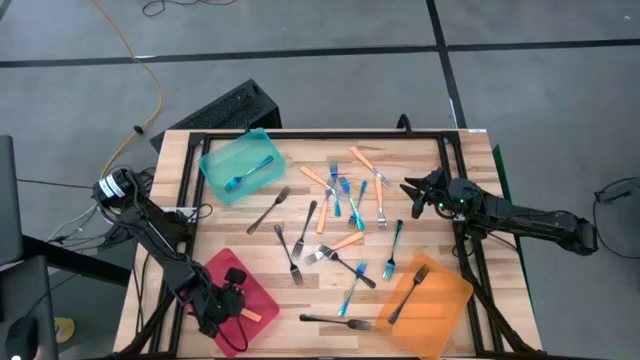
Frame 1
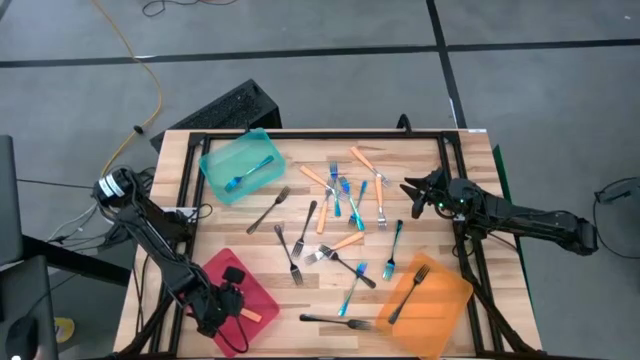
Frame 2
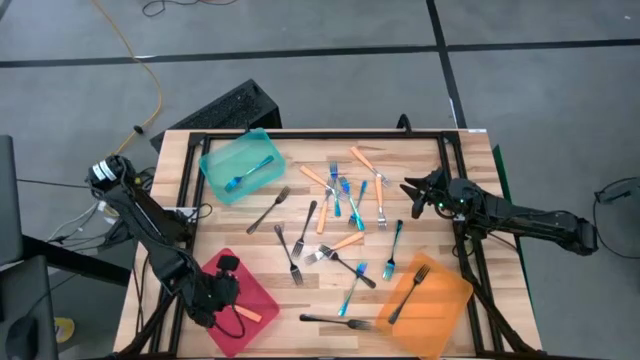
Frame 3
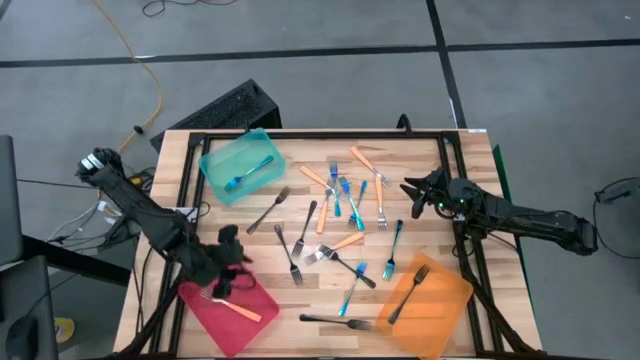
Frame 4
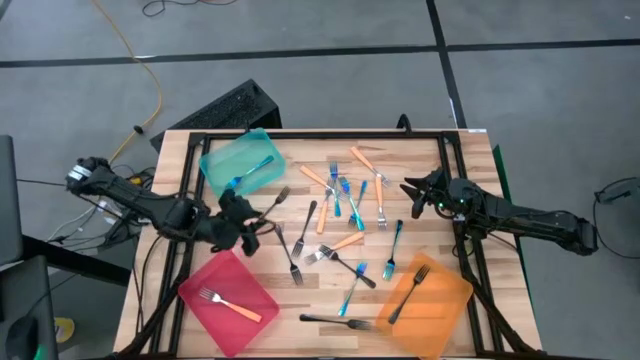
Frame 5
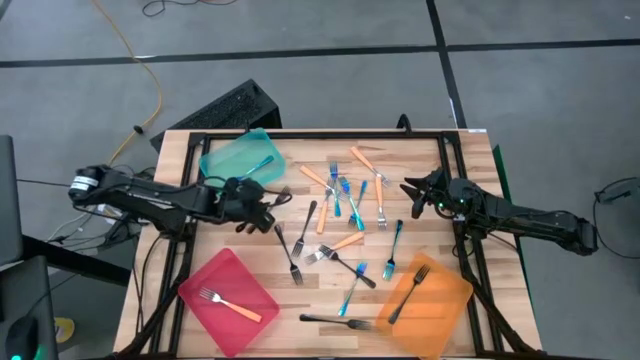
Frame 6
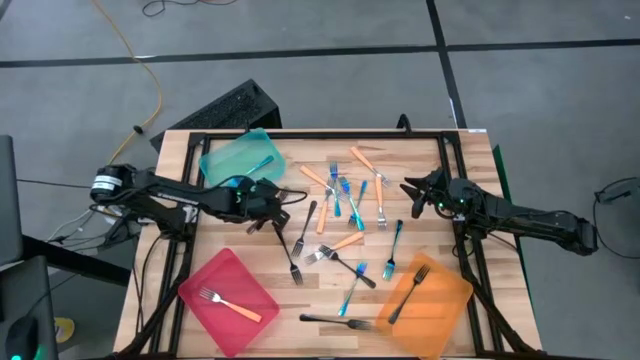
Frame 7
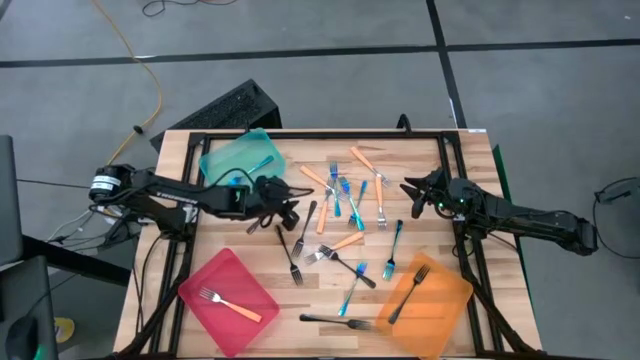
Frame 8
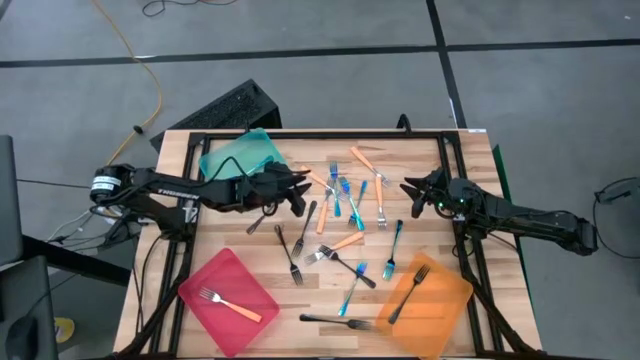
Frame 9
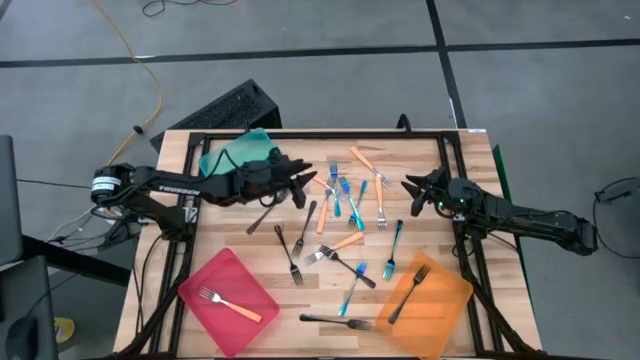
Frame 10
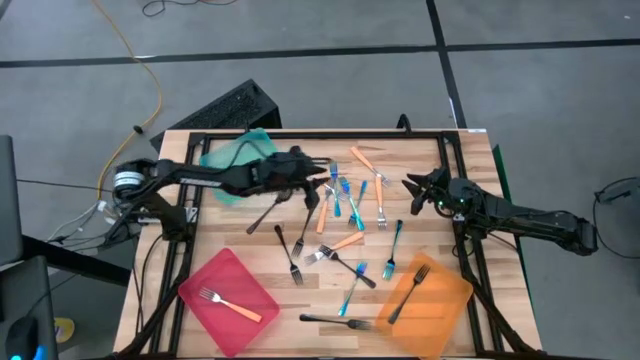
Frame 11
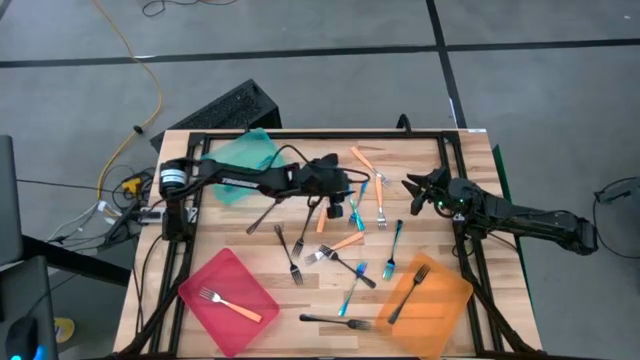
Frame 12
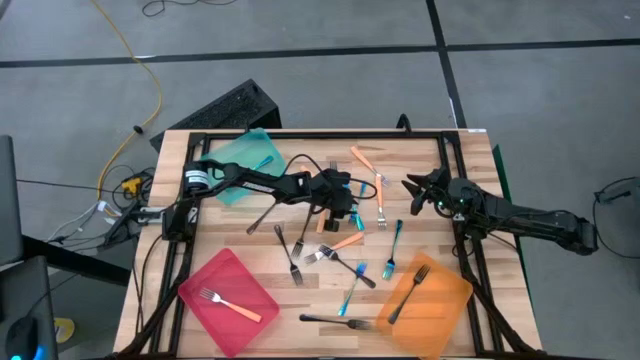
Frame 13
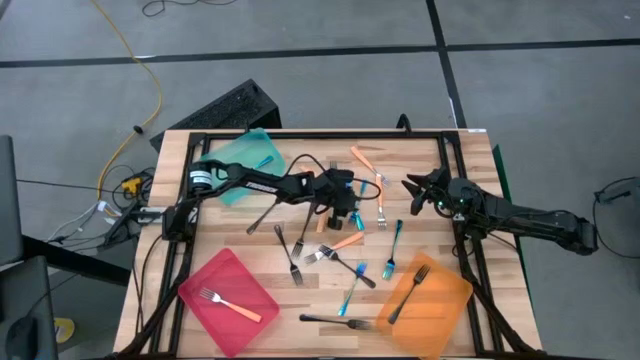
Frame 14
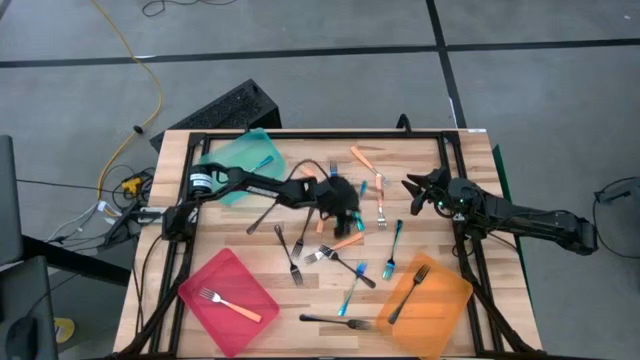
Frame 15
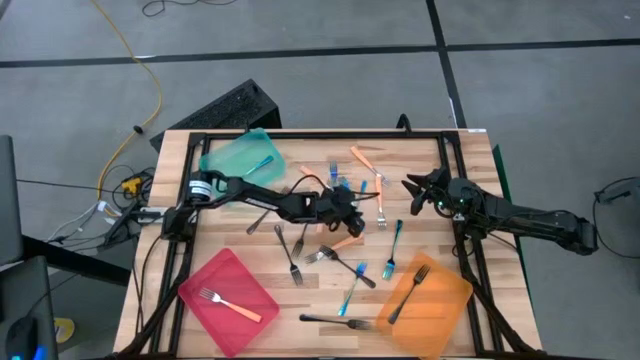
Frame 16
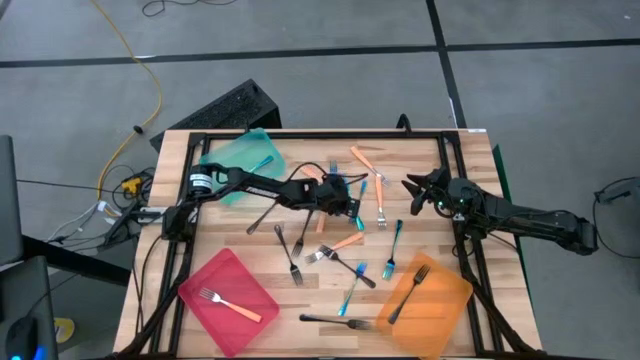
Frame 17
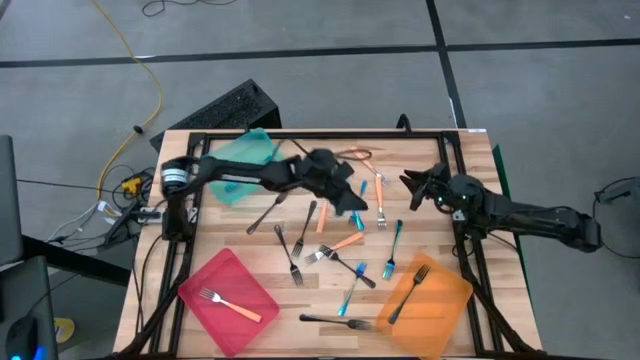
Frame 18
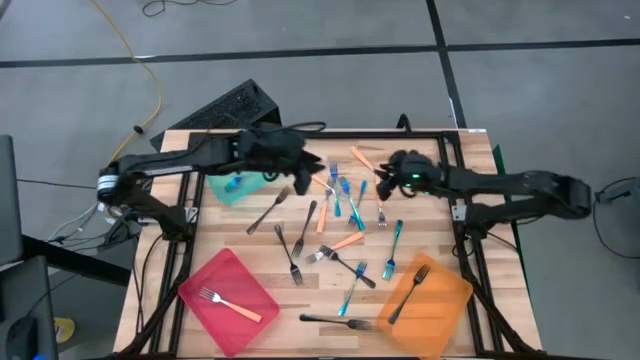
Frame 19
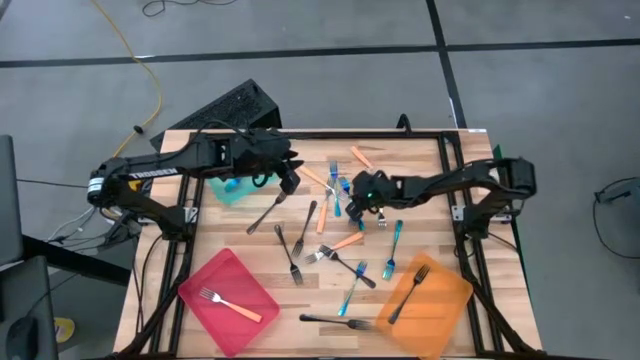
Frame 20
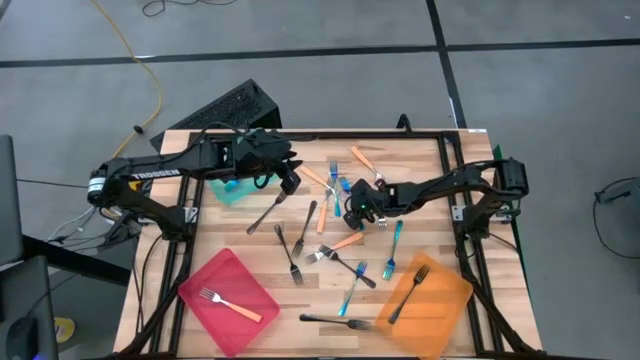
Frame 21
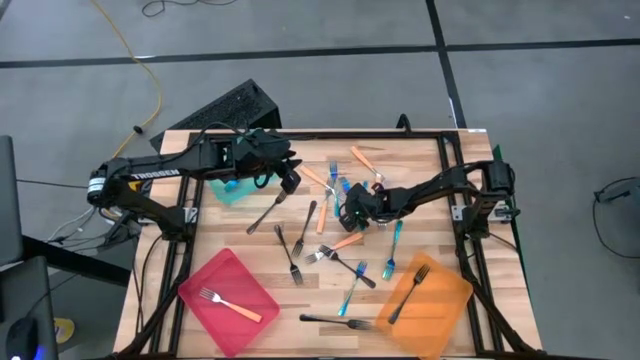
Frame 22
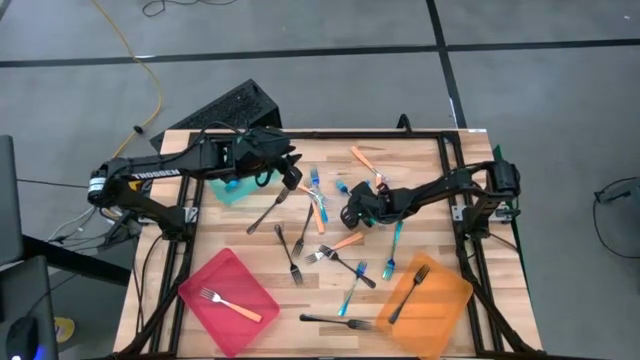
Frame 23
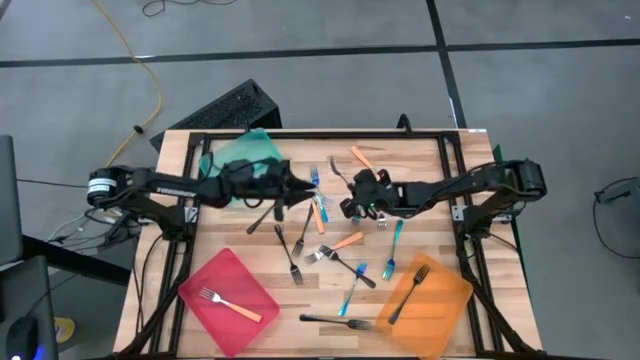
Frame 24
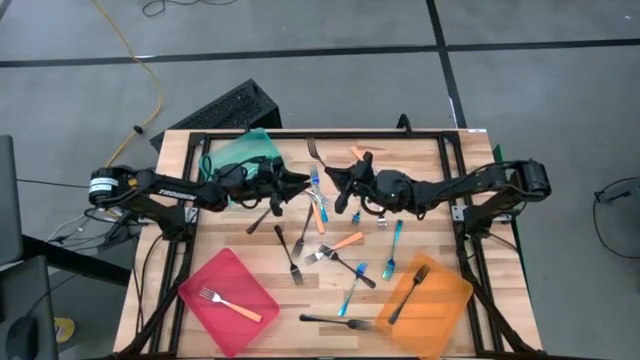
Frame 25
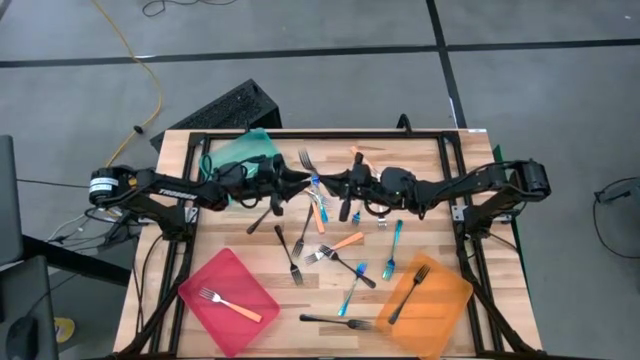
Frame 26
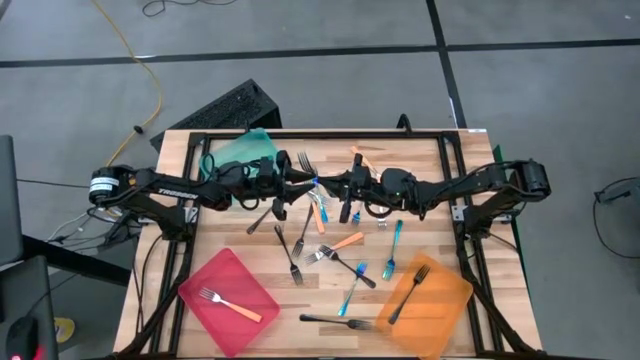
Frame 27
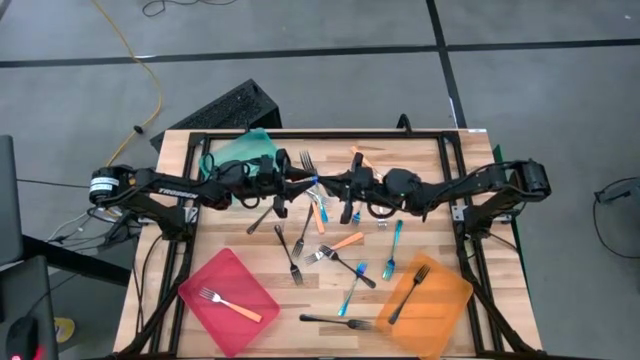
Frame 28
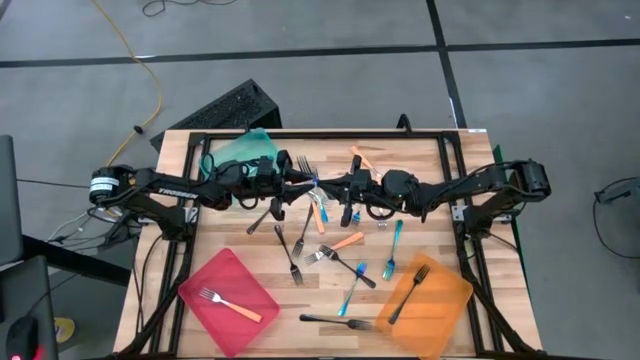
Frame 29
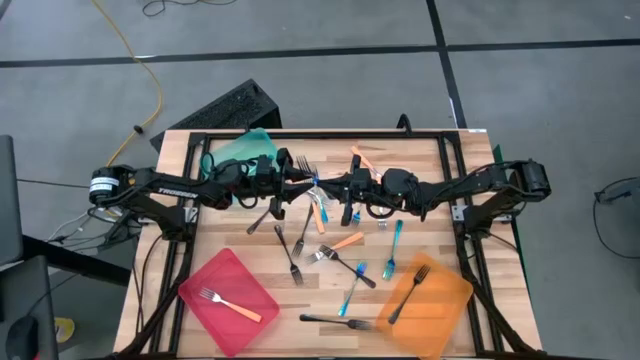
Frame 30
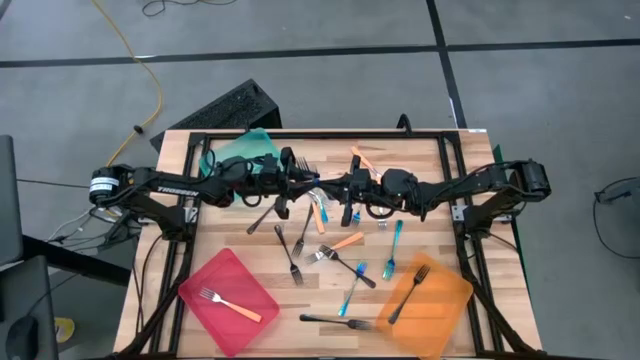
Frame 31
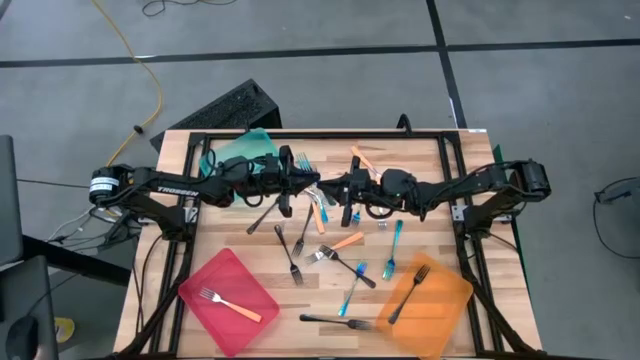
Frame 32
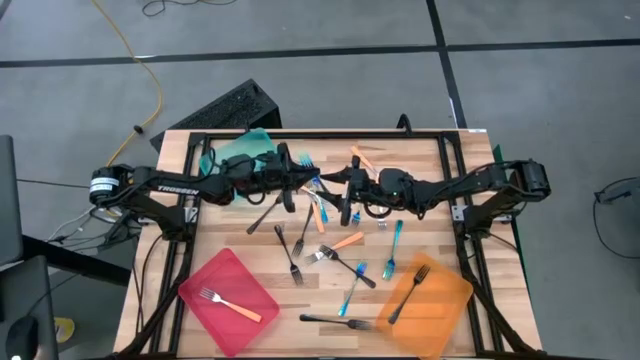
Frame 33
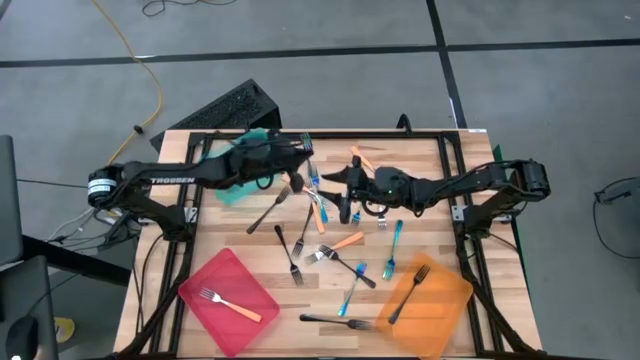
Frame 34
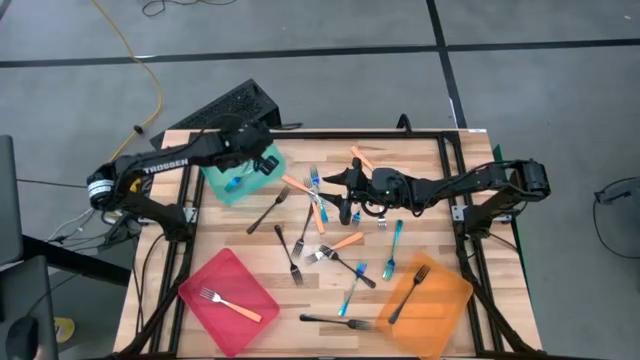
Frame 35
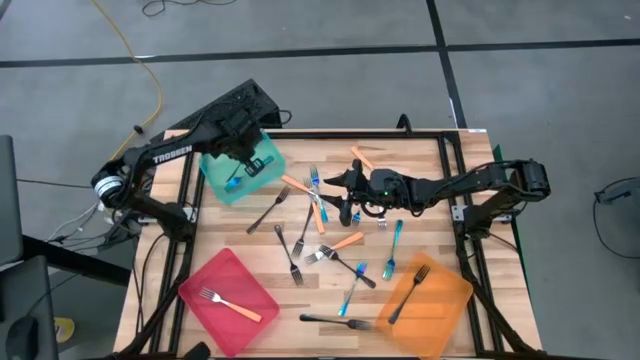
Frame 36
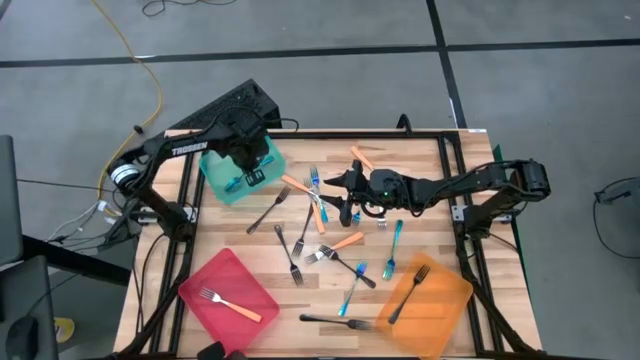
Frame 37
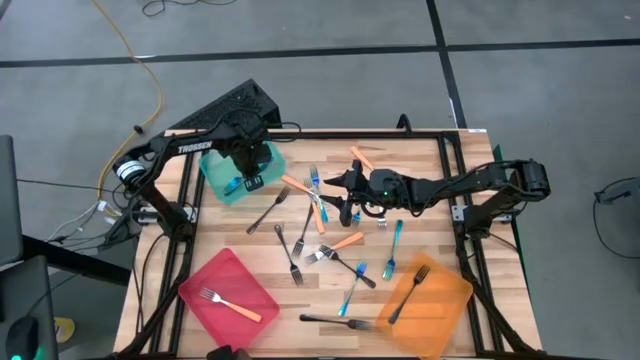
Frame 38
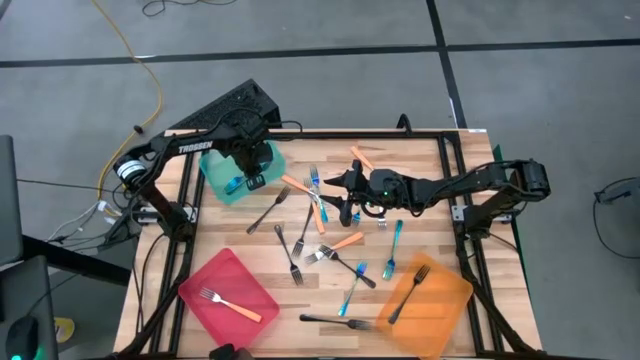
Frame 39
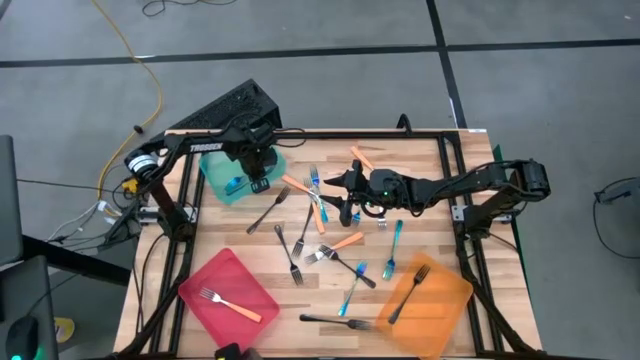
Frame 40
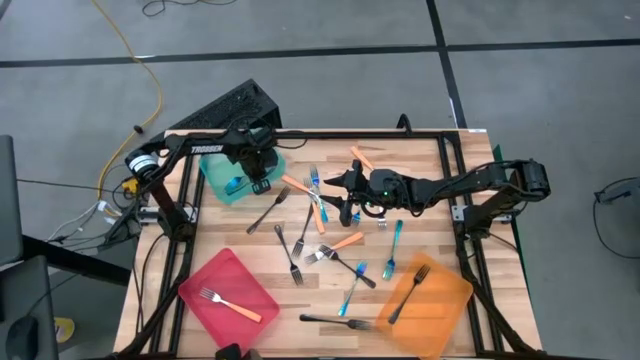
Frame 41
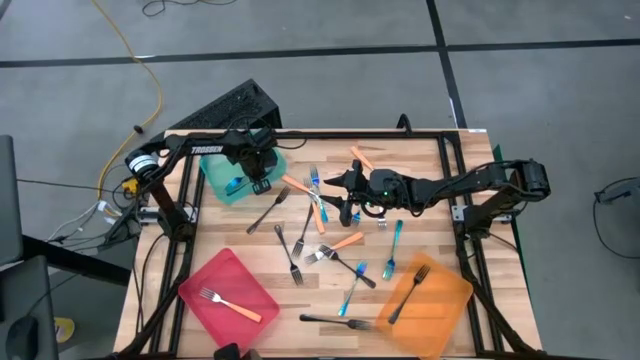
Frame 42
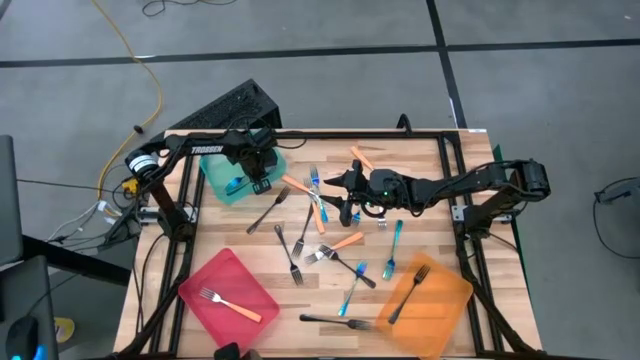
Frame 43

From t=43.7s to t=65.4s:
Task: Sort silverware by color (type)
Put the blue fork into the blue bin
